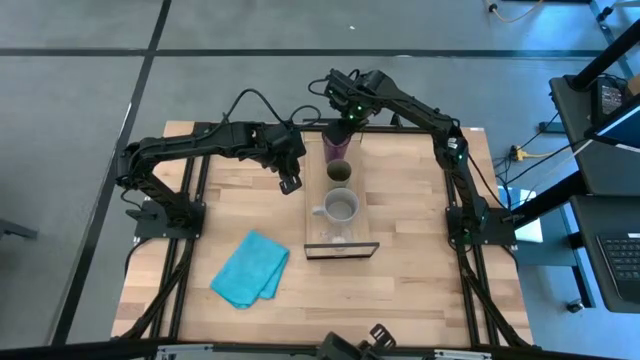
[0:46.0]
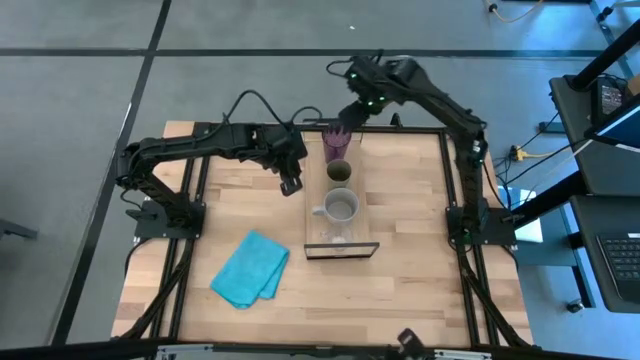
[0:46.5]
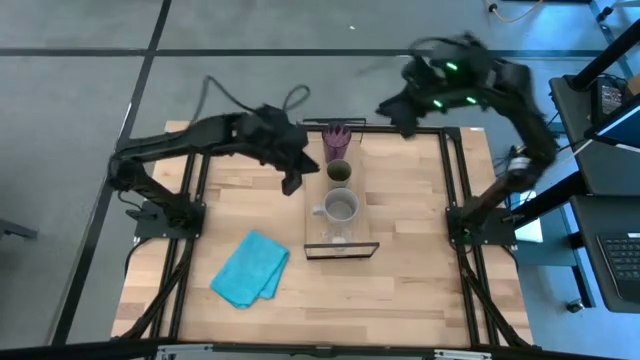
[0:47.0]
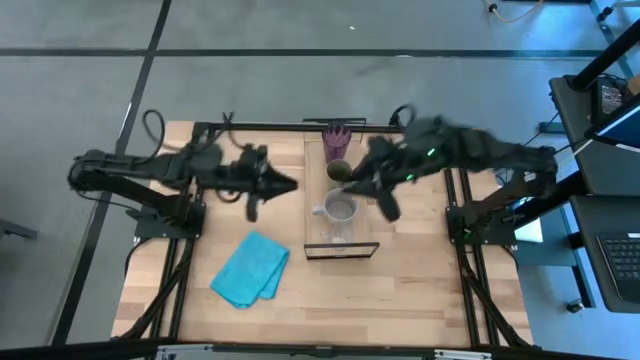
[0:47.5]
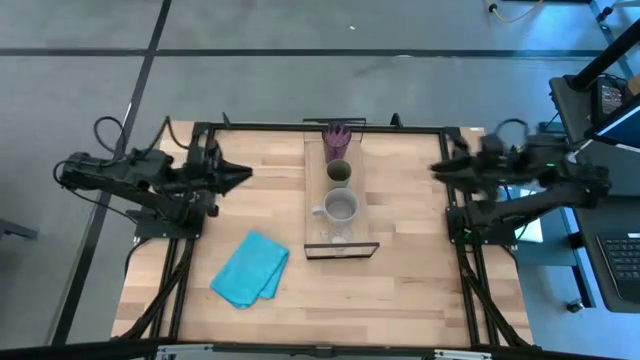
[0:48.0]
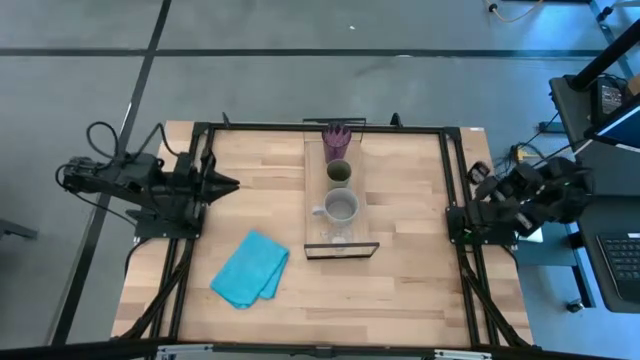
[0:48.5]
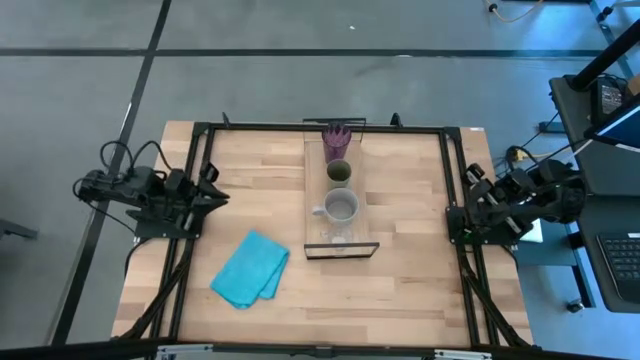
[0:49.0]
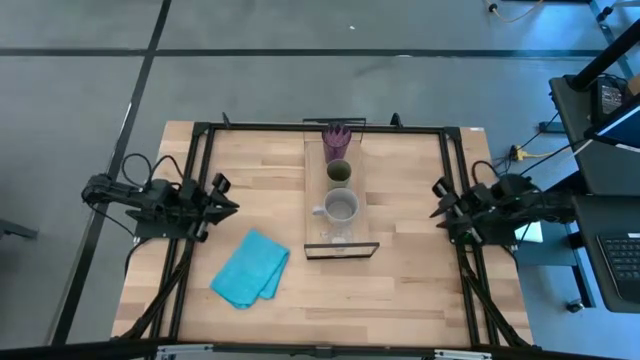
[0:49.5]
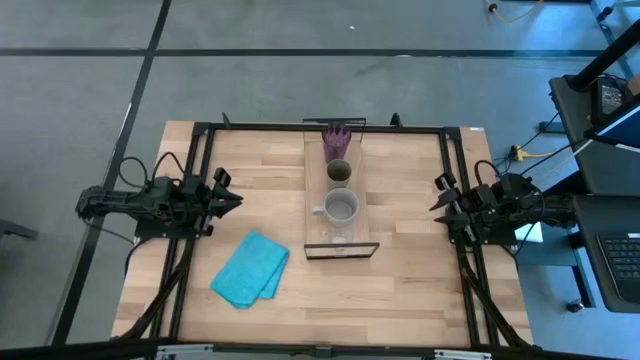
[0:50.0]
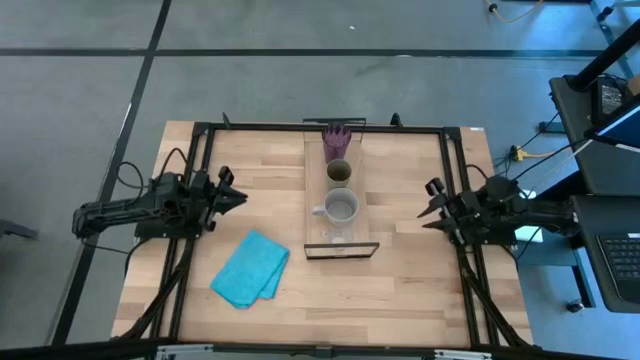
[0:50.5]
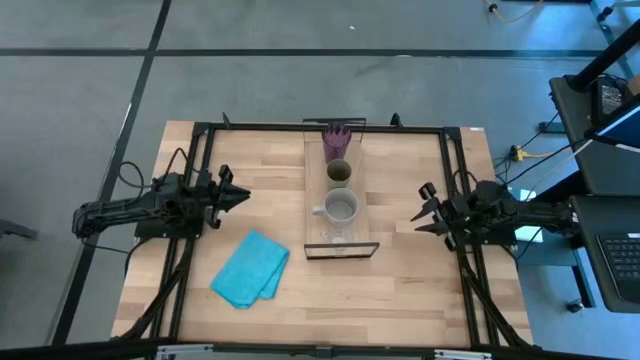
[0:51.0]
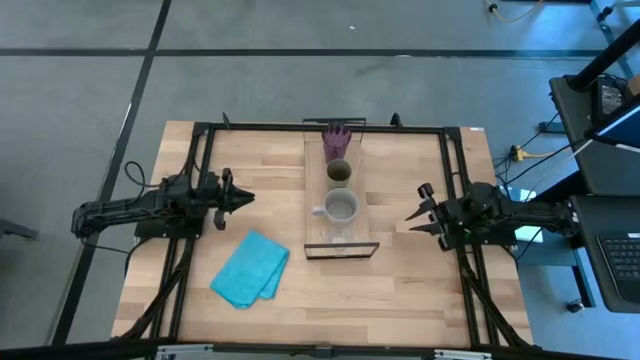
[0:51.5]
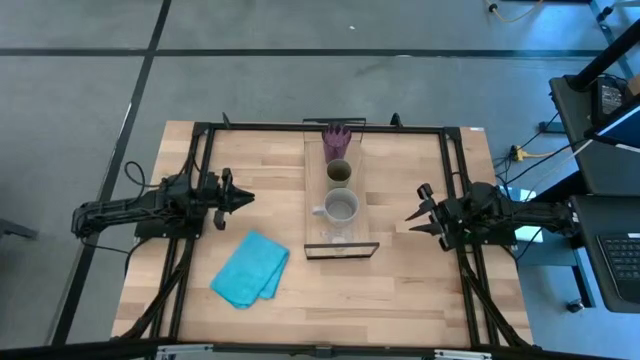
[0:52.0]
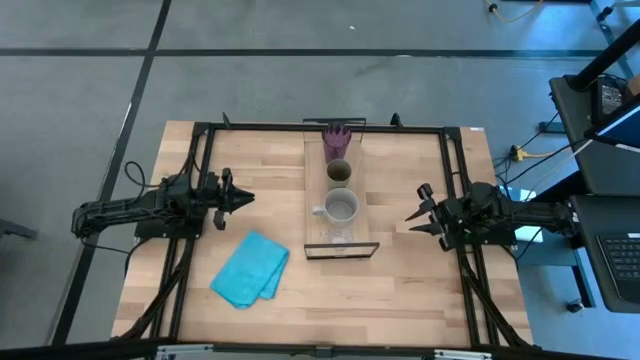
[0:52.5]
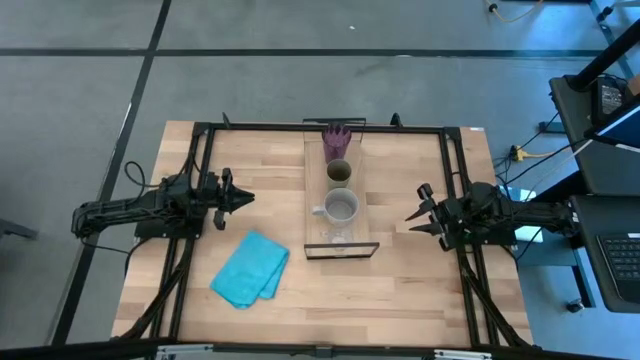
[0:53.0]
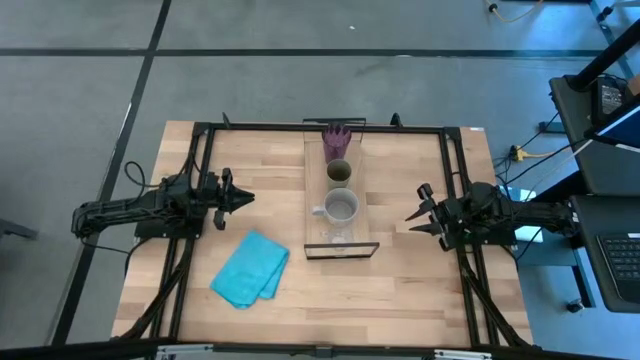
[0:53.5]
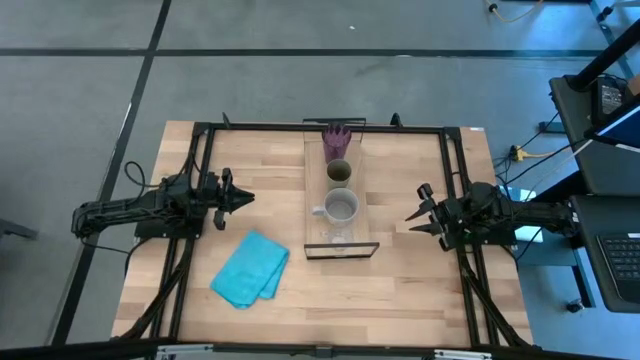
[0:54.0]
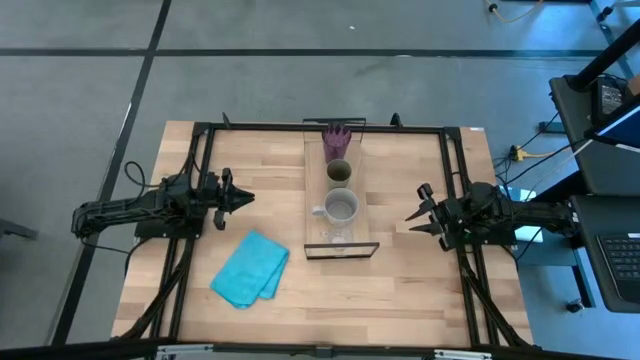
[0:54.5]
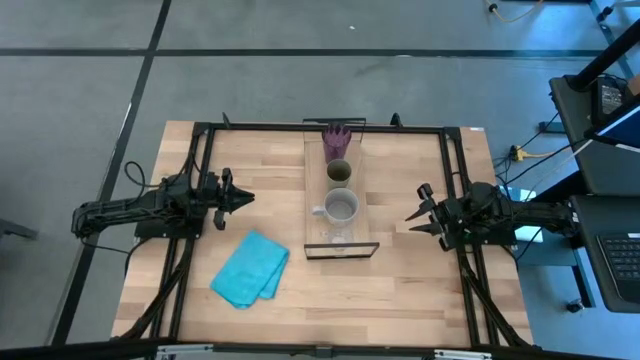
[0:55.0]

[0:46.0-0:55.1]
Task: Stack small to large cups/mugs on shelf
Return to Home Position

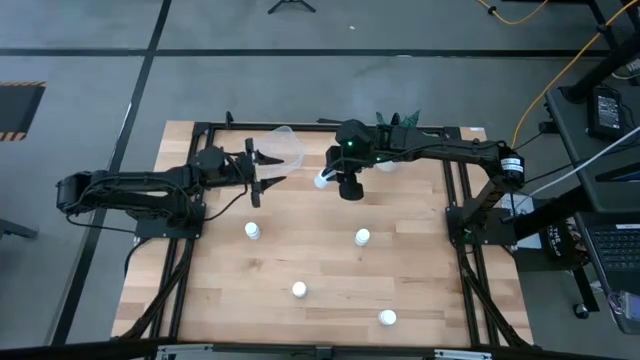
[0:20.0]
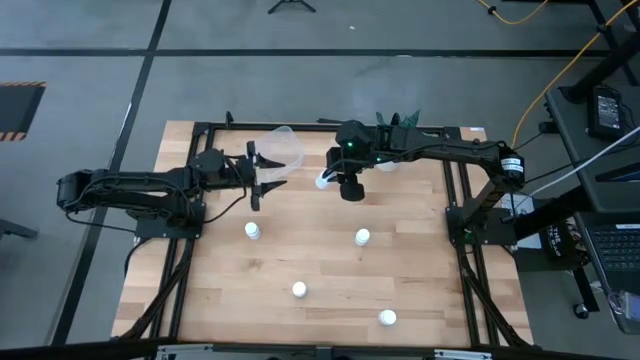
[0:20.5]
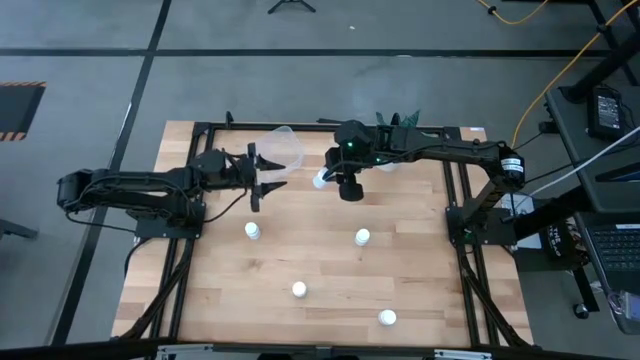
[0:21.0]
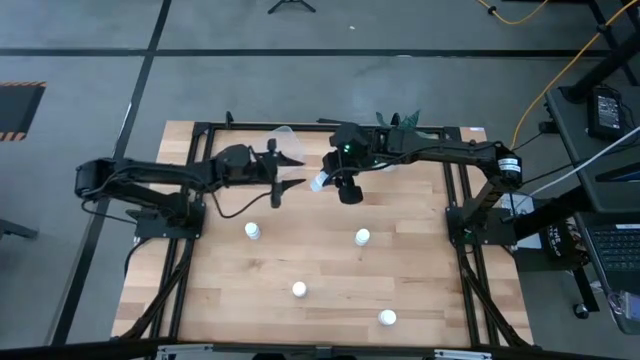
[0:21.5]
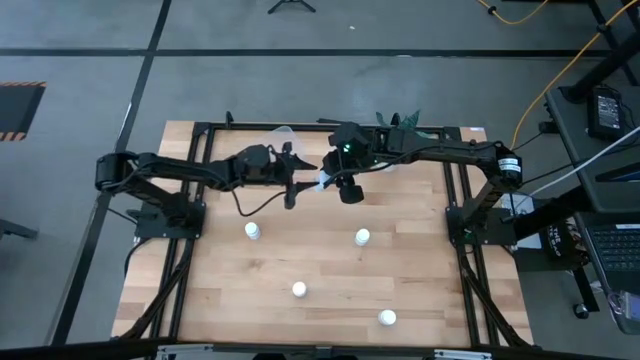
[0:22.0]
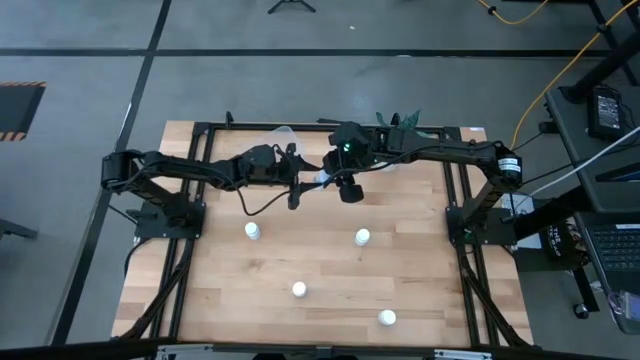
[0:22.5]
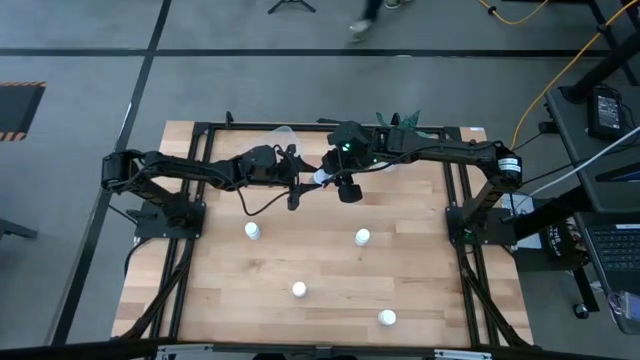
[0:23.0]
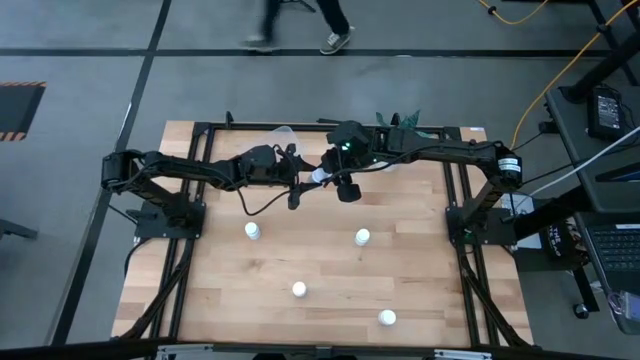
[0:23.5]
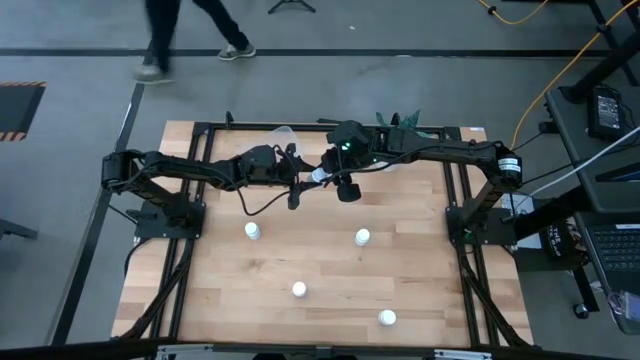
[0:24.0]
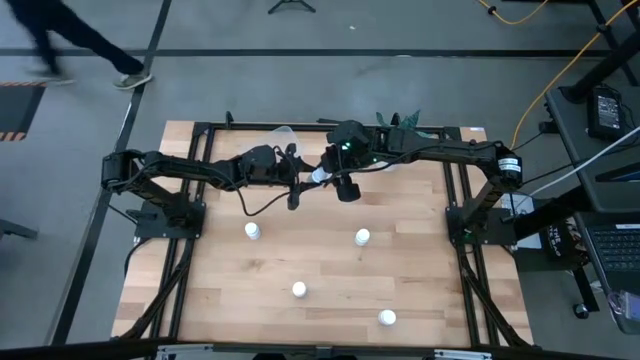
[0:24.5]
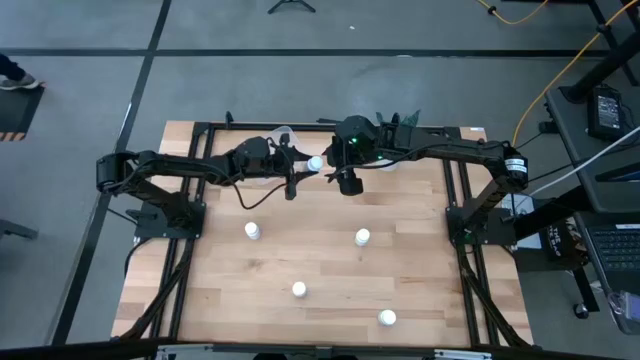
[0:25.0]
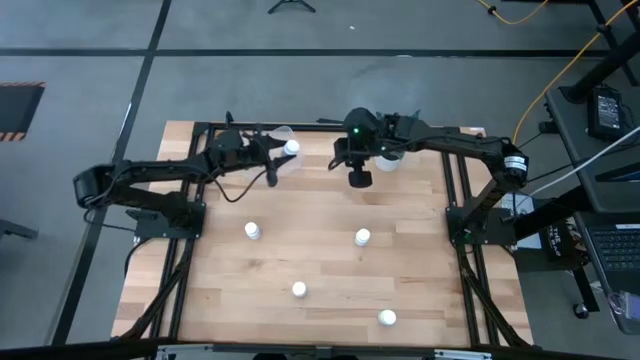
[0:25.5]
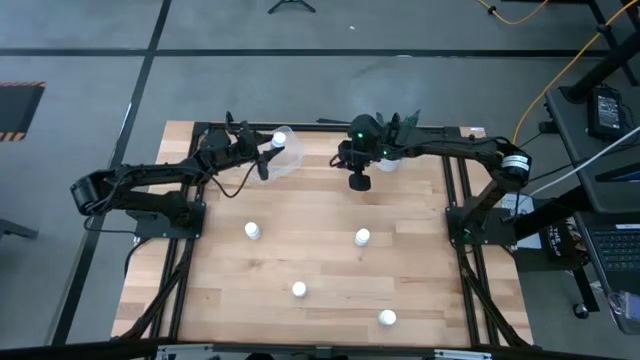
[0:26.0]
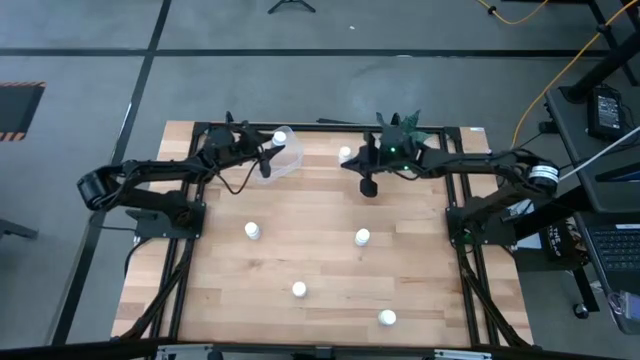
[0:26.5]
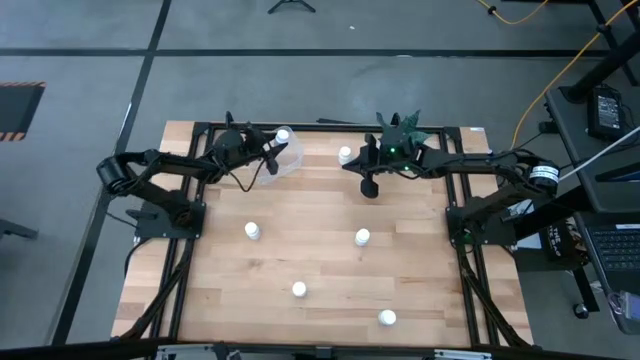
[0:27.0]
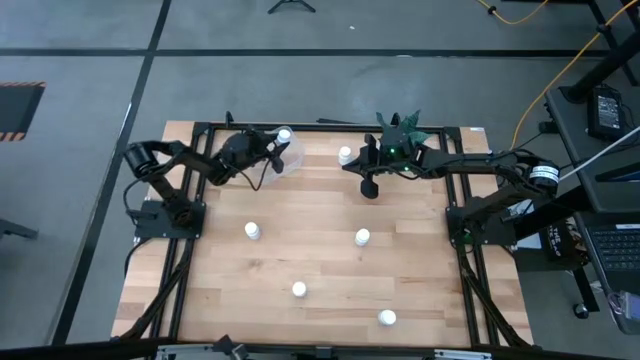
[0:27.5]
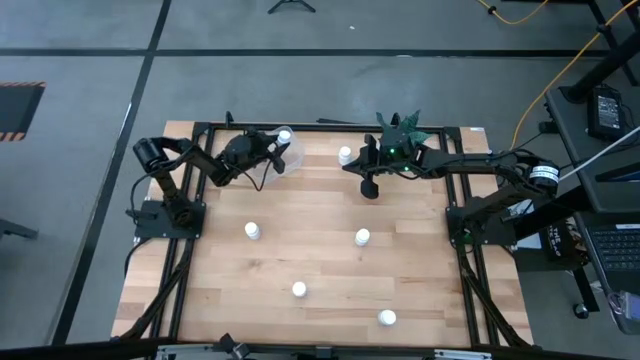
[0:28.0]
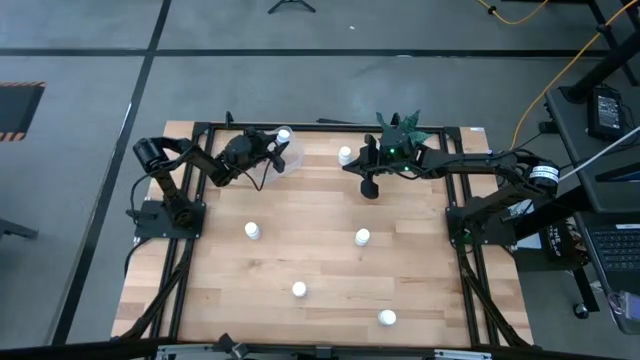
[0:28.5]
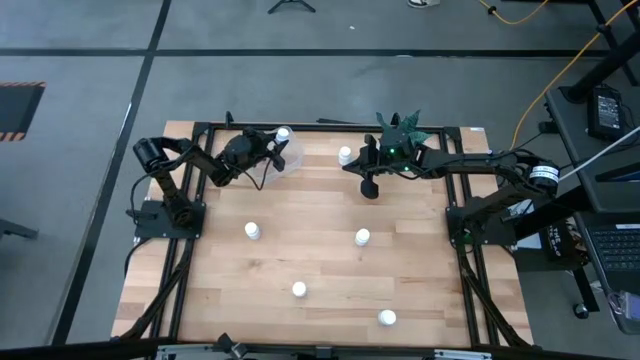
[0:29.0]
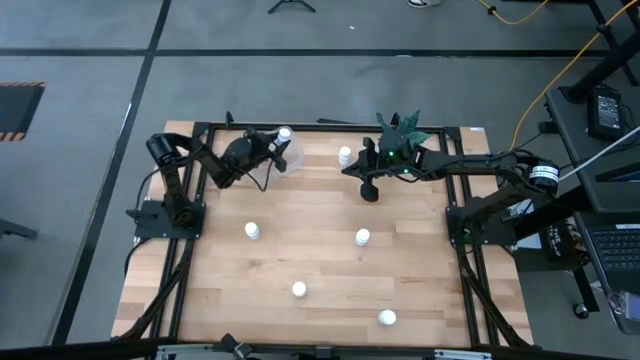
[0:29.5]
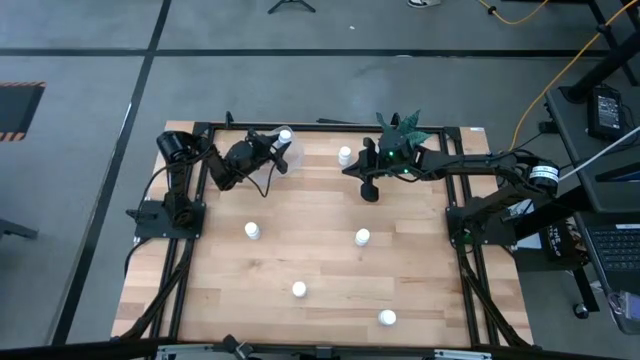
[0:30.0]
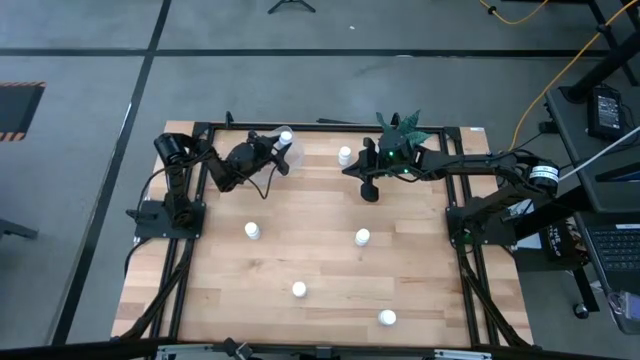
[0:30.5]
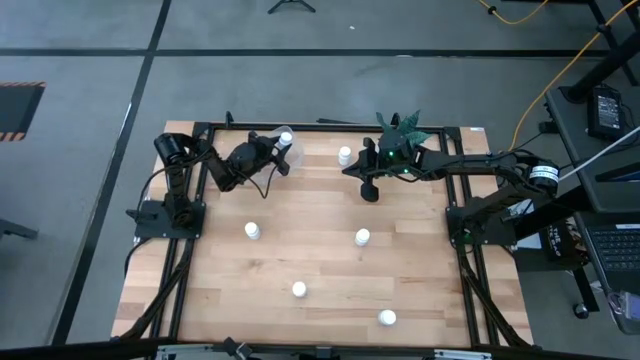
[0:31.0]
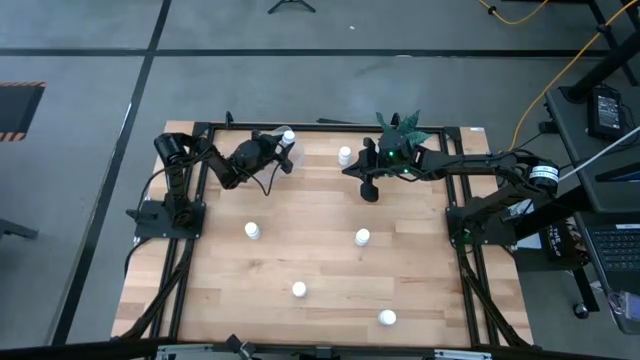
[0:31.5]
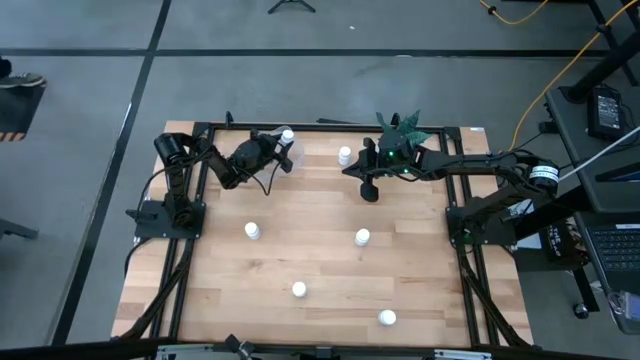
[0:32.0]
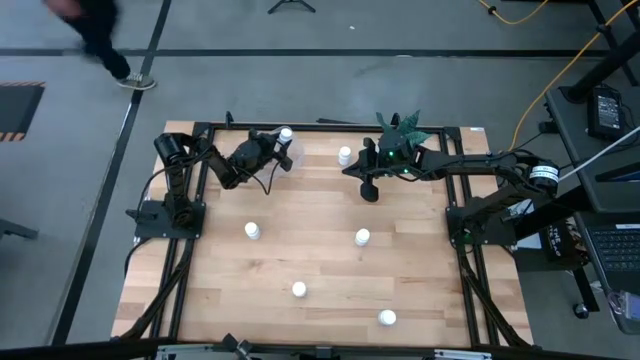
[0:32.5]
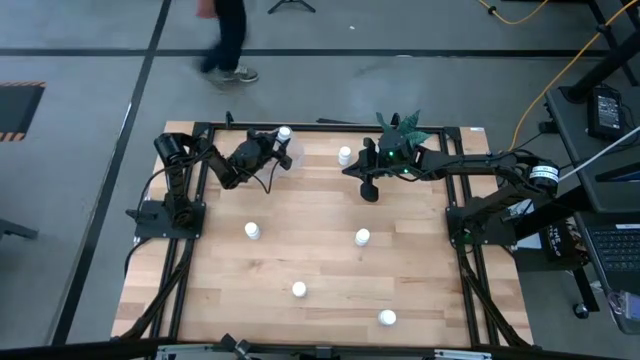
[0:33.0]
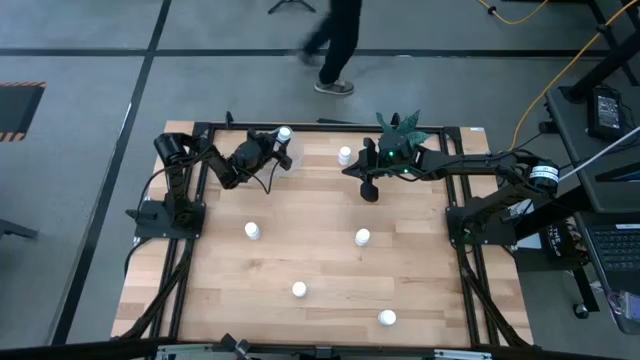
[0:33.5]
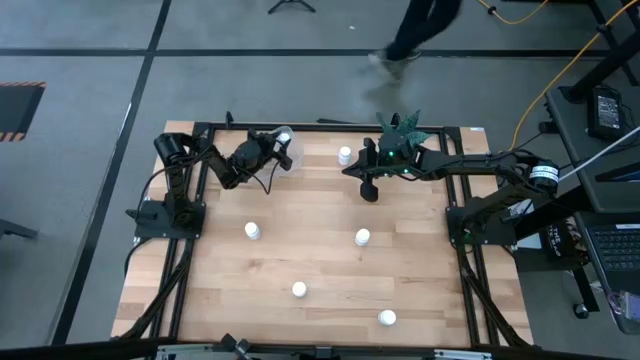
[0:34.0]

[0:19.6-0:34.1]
Task: Pick and place pill bottles into a basket
Put the white pill bottle into the transparent container
